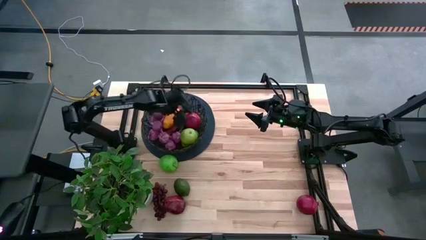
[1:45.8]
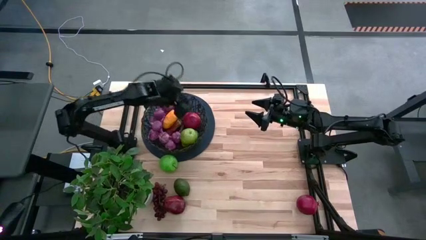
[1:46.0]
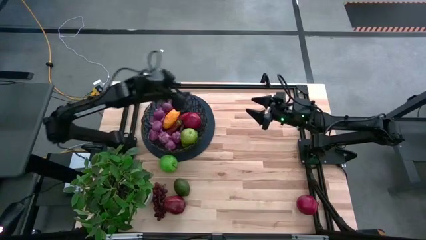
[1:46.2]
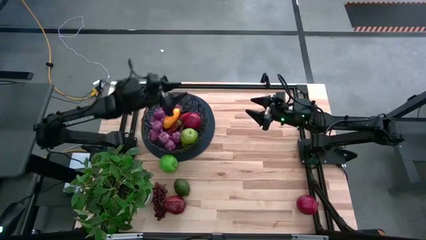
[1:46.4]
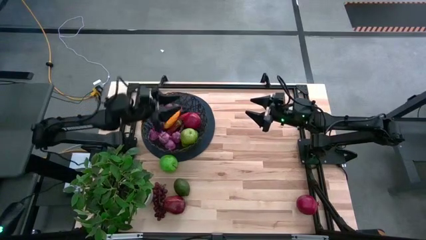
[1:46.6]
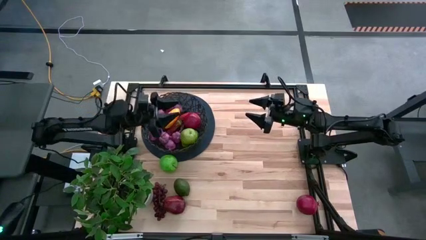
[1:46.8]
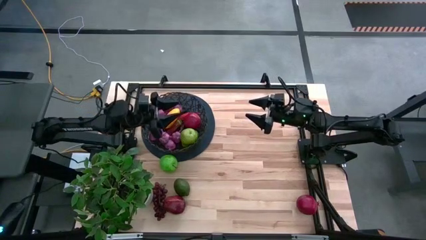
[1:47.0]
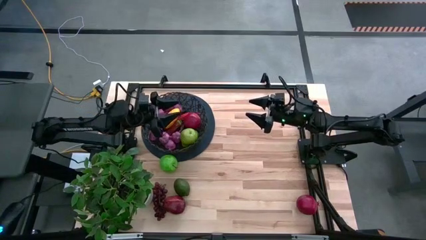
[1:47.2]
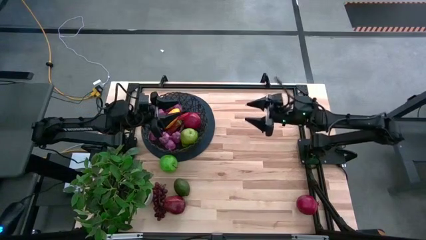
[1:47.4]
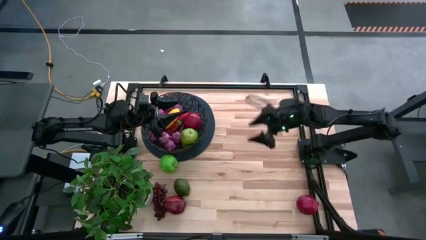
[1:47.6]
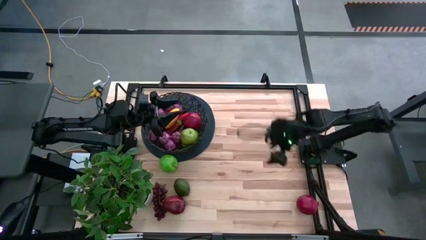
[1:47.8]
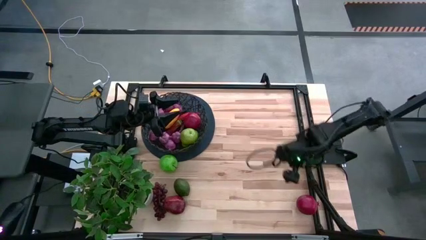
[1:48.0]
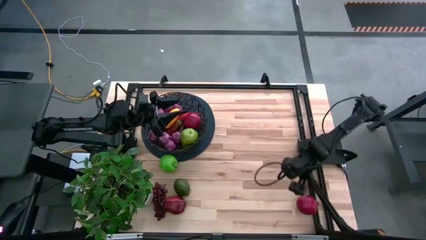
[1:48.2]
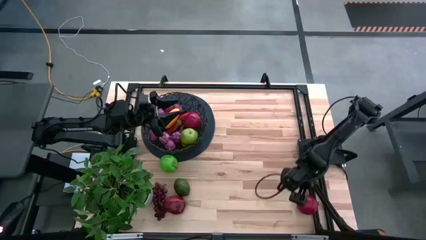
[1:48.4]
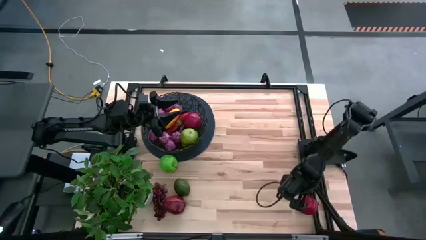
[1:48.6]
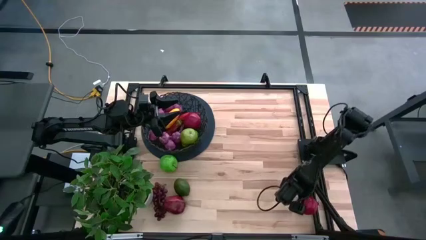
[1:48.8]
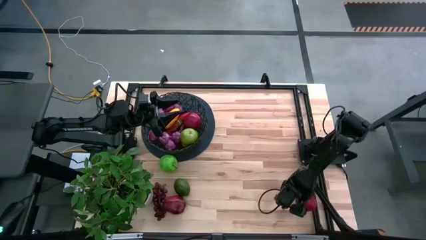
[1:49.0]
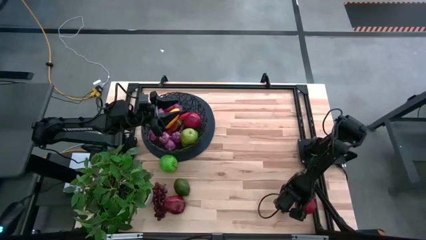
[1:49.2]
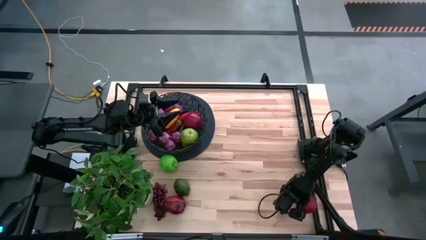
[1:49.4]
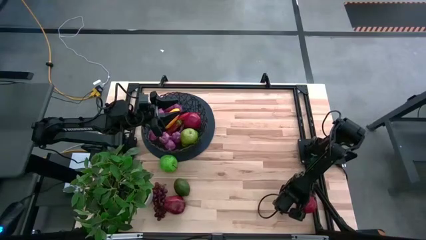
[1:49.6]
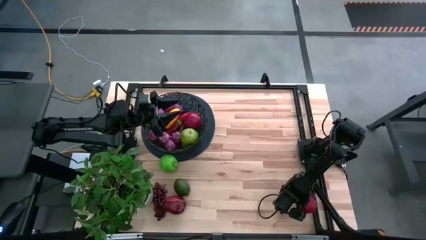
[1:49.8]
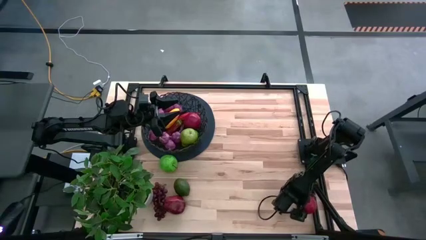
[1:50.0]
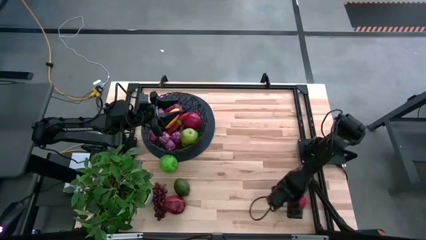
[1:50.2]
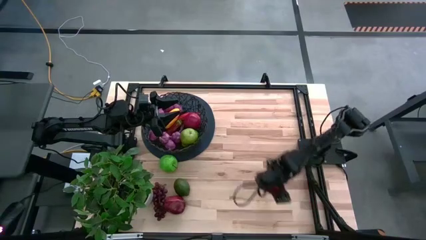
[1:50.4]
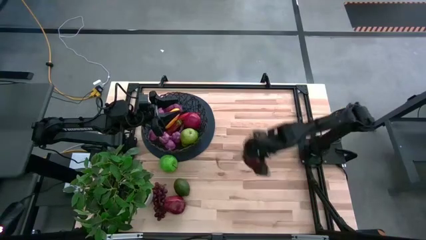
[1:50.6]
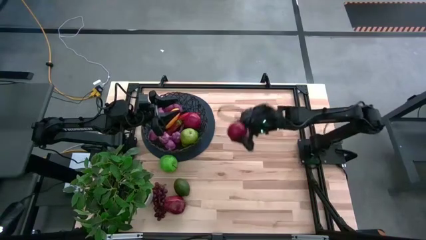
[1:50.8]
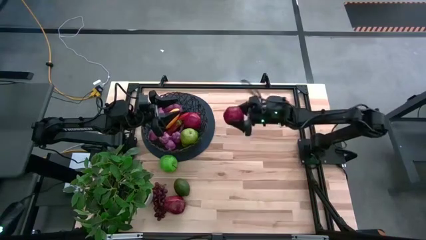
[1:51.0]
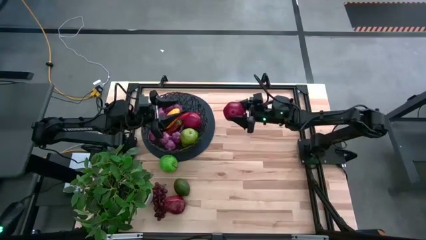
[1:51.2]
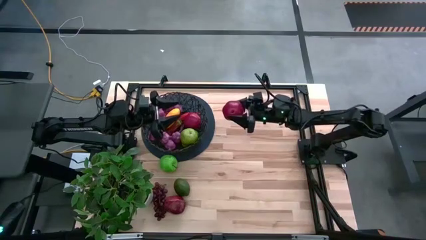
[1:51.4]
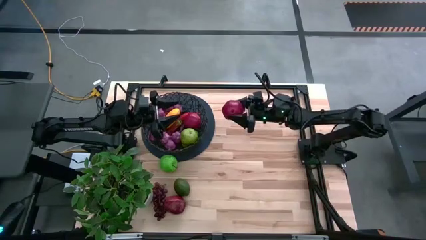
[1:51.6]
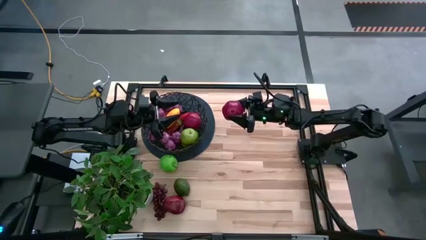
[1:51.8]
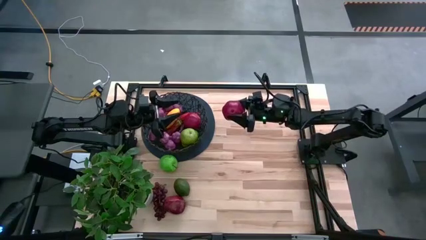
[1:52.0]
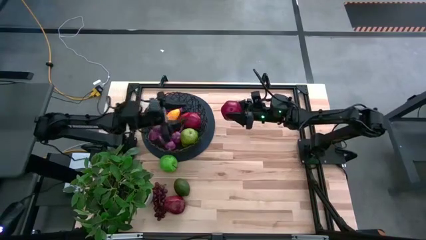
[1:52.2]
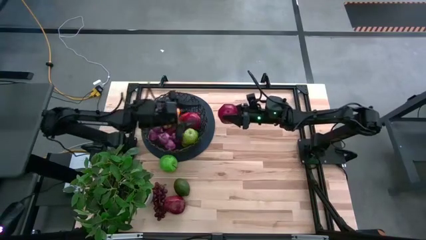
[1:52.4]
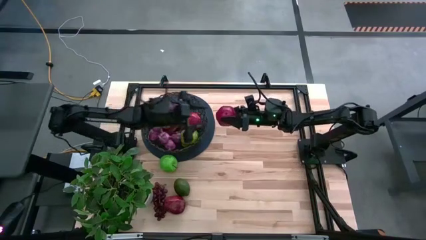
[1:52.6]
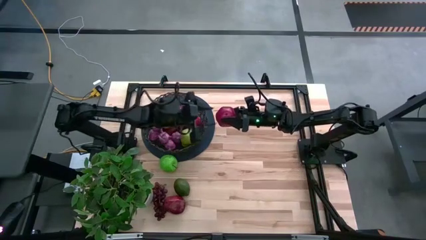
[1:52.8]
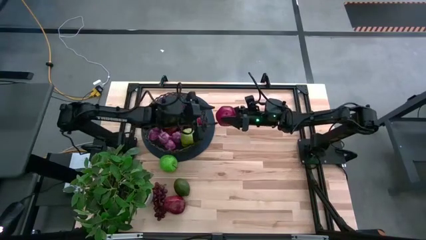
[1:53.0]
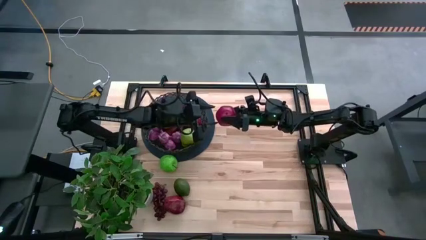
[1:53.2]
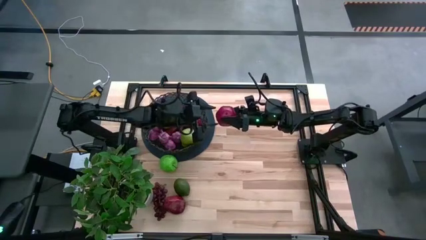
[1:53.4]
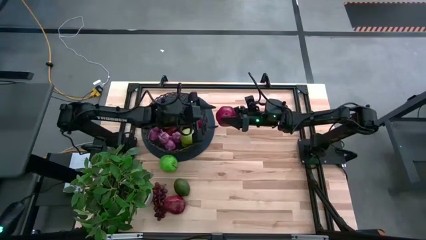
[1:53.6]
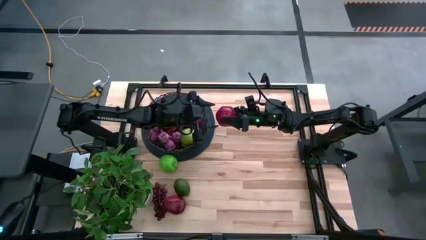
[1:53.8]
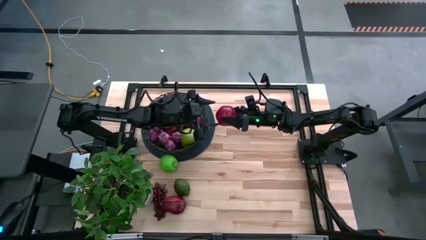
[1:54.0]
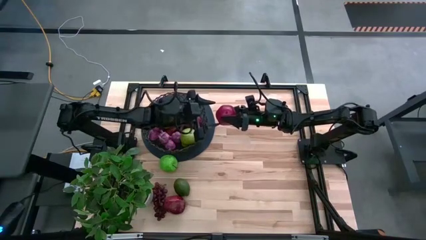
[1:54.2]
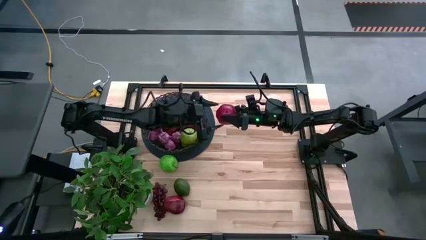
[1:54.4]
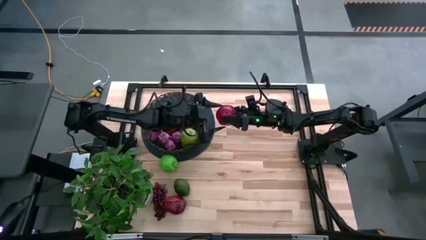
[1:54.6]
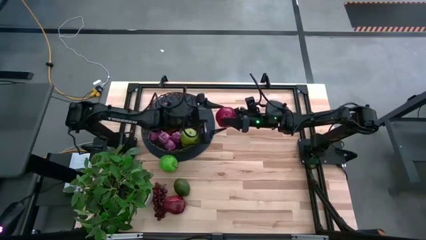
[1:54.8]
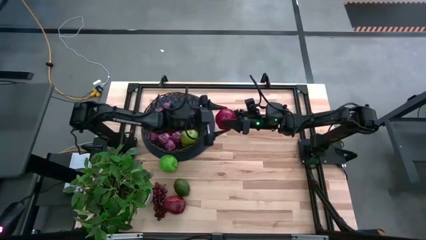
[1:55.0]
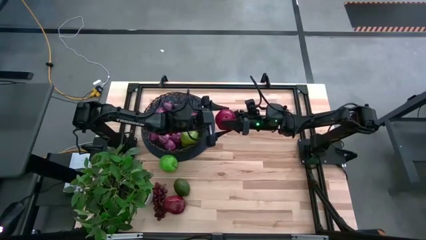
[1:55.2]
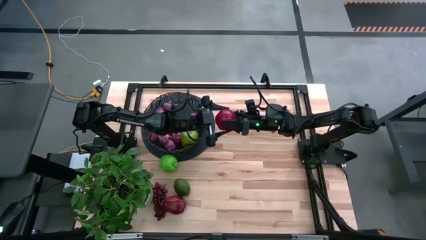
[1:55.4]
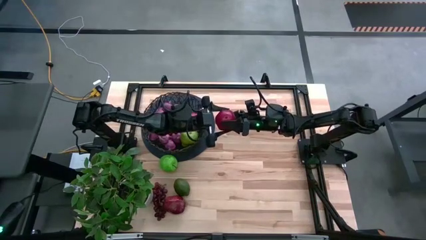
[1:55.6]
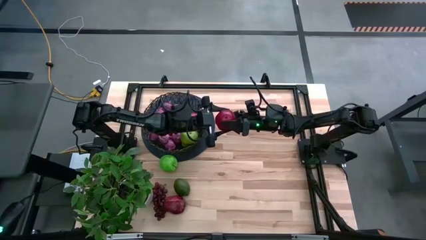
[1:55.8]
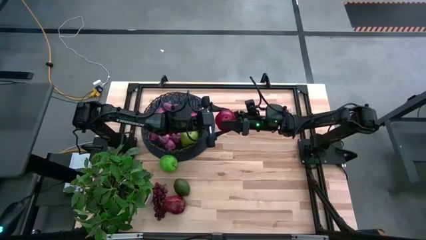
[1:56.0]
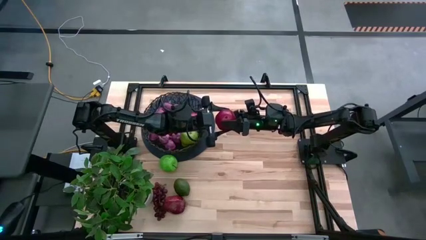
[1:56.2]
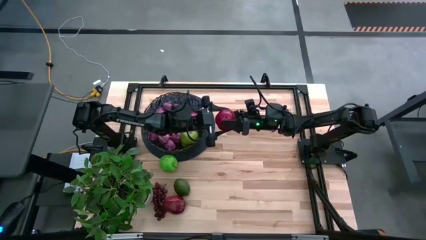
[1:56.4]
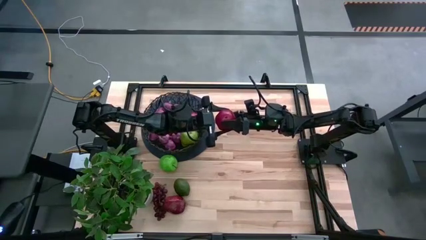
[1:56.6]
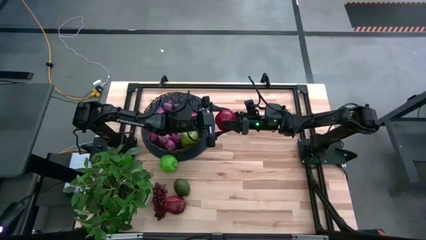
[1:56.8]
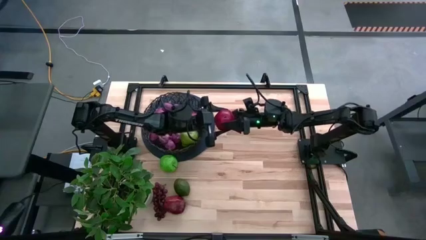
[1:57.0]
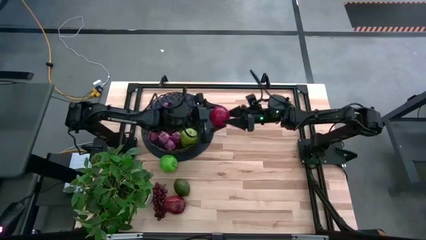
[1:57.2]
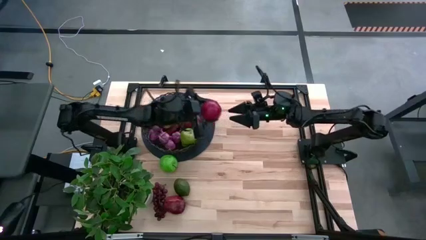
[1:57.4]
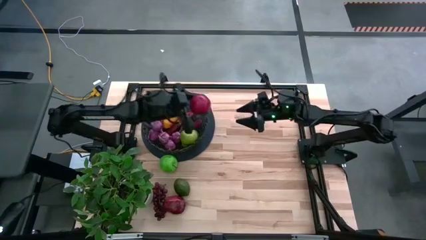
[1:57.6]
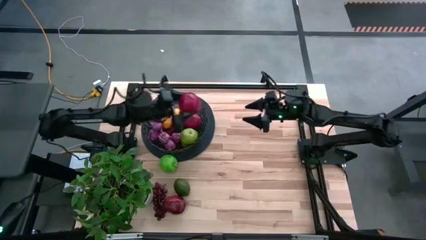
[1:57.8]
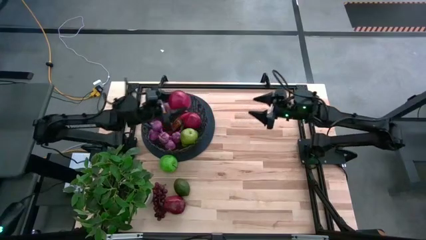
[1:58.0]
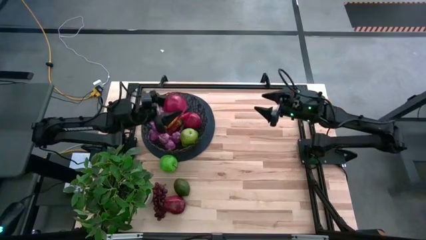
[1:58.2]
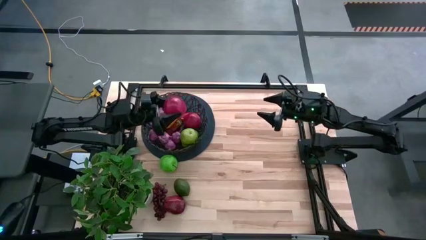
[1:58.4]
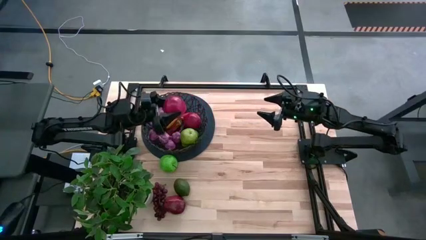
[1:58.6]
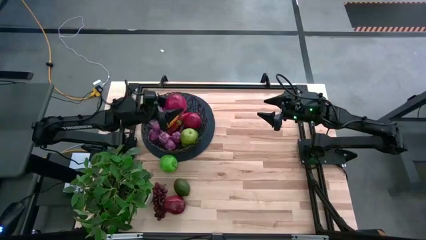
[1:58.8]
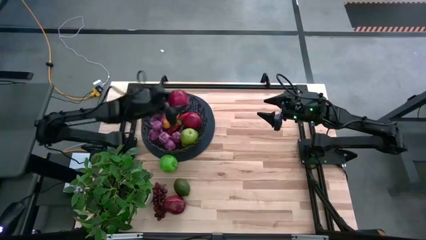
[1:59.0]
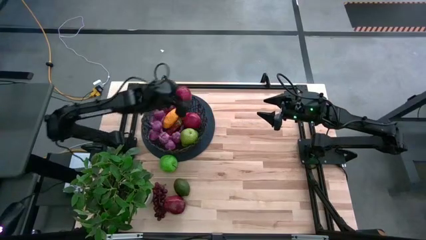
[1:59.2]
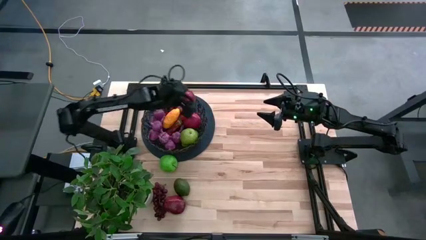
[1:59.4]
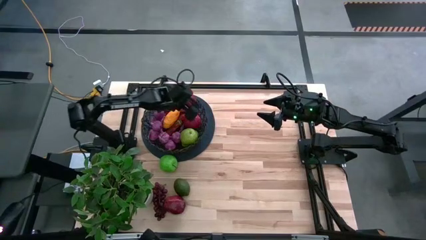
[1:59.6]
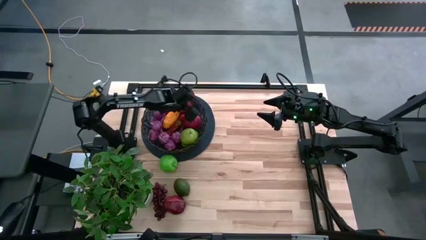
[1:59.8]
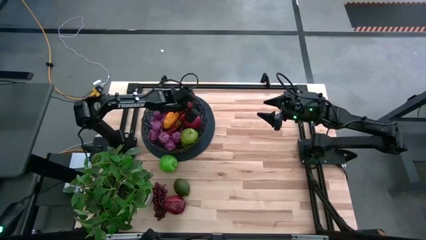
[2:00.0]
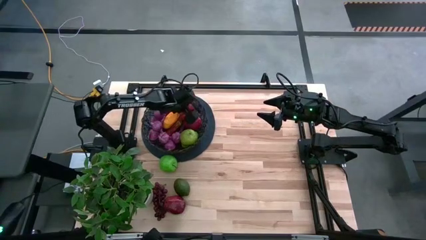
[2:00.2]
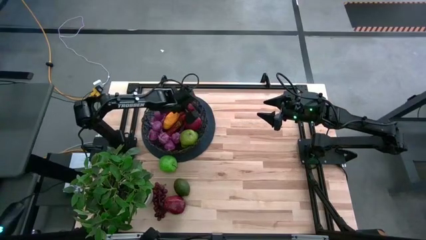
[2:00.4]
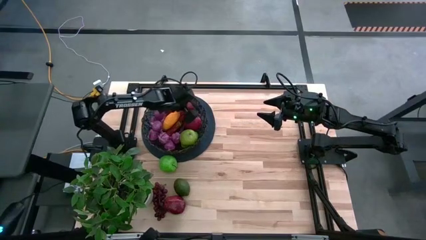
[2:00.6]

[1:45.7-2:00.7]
Task: Build produce basket
Put the pomegranate into the wire basket

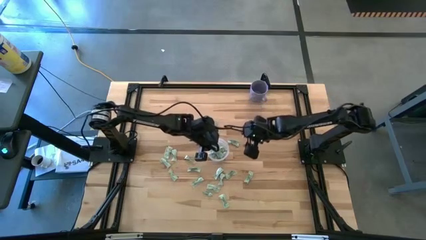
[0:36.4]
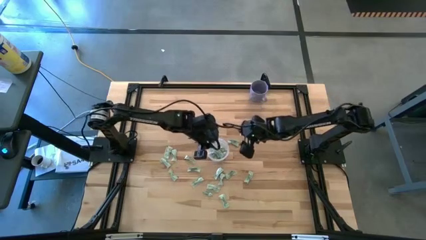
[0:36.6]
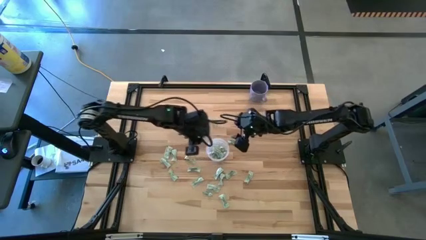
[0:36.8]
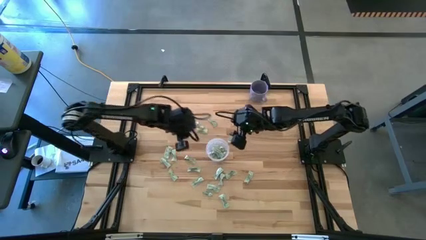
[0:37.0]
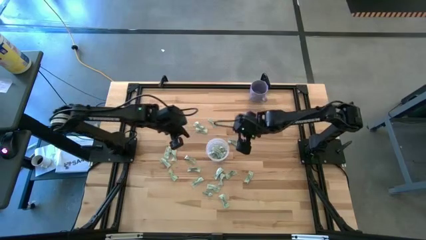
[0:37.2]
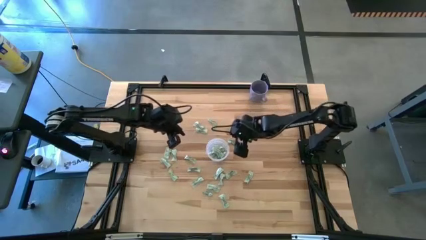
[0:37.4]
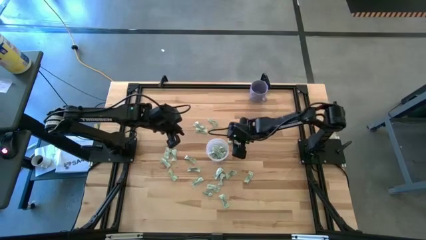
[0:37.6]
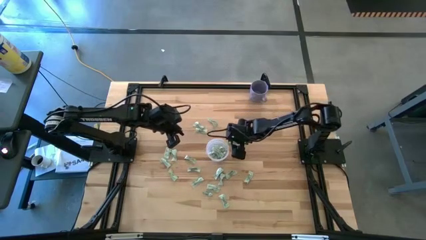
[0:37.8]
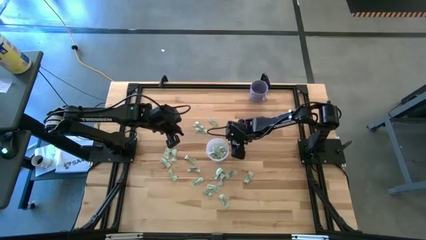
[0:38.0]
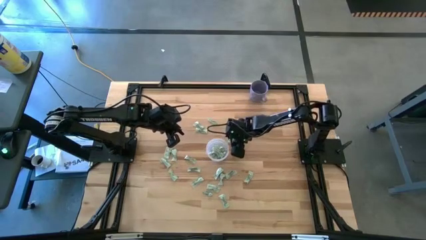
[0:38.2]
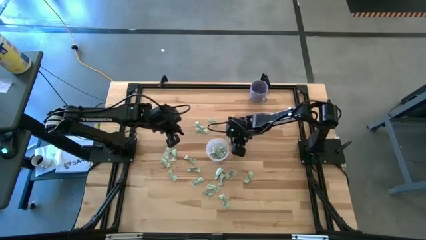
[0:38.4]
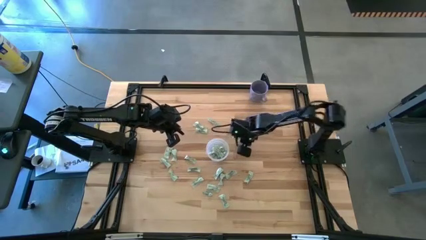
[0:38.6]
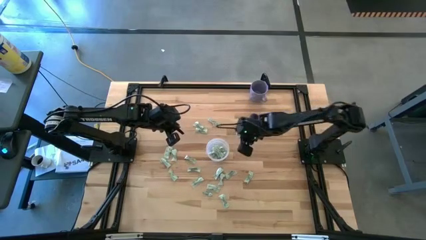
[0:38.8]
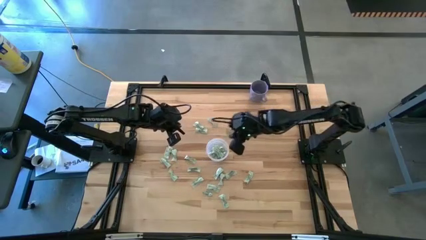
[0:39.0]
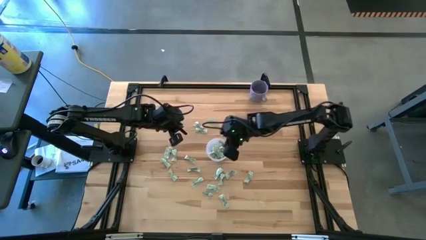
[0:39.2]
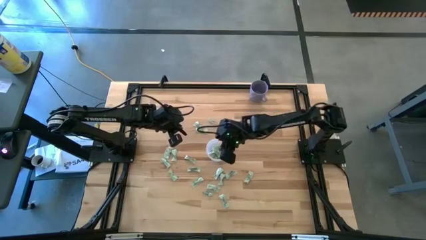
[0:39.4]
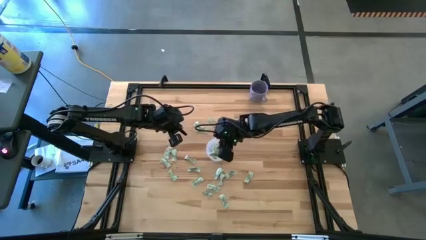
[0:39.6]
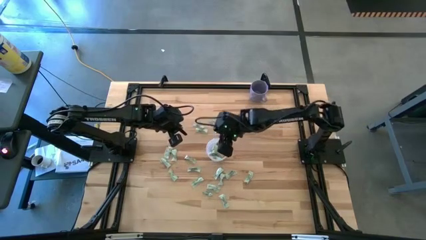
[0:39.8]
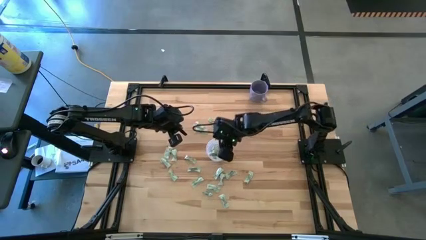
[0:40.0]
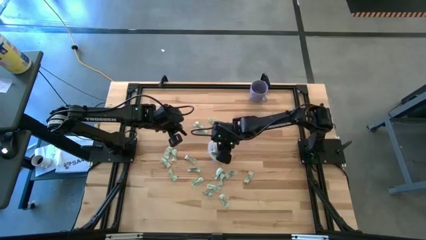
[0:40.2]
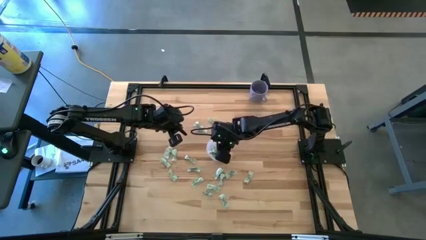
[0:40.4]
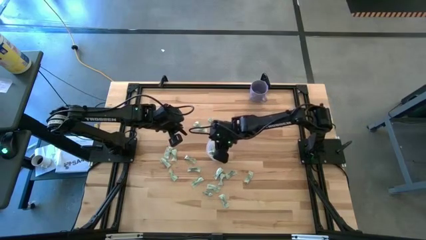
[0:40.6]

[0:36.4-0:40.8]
Task: Pick and place Stevia / Truvia into bins
Put the green stevia packet into the transparent container
